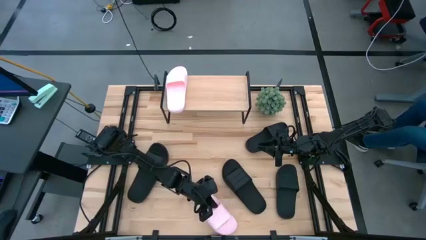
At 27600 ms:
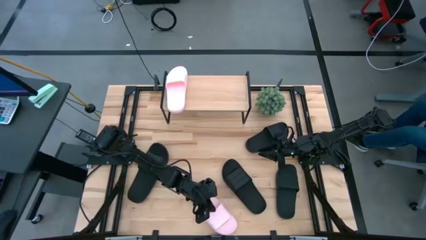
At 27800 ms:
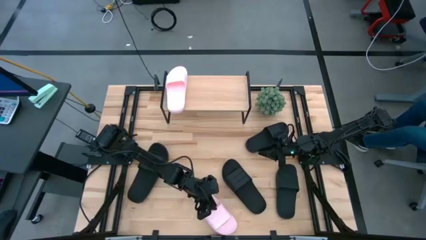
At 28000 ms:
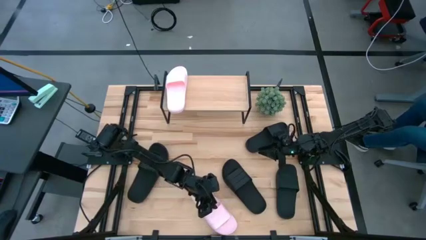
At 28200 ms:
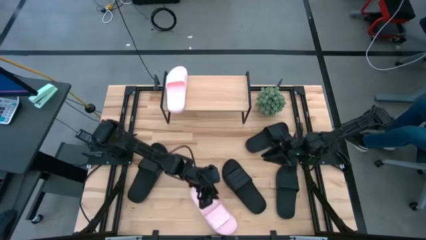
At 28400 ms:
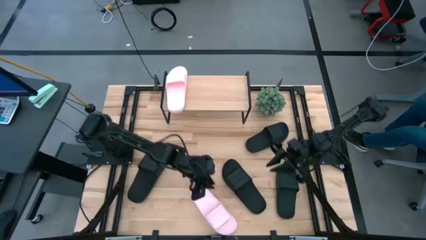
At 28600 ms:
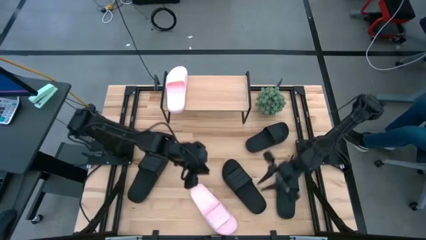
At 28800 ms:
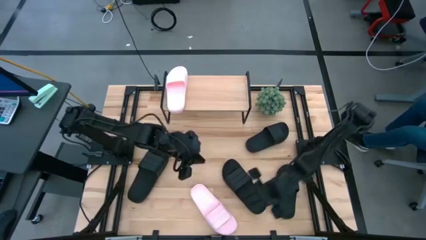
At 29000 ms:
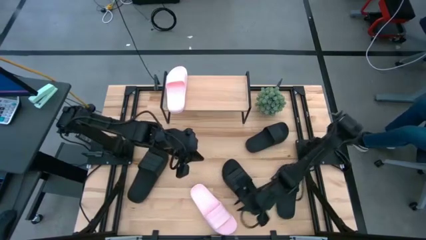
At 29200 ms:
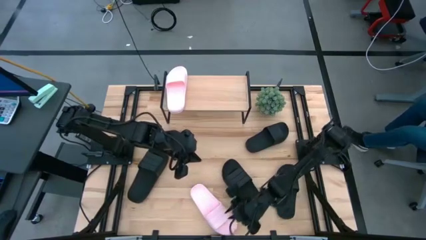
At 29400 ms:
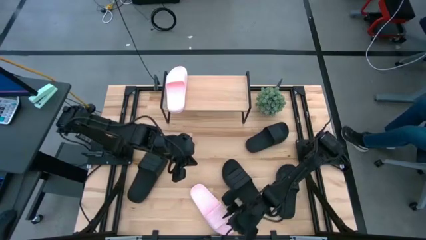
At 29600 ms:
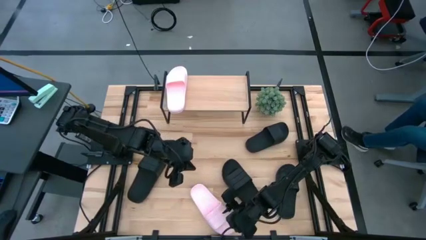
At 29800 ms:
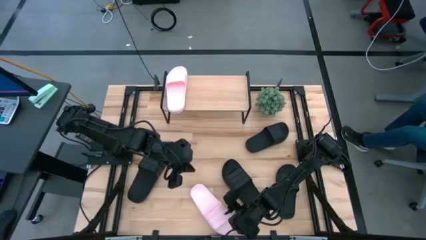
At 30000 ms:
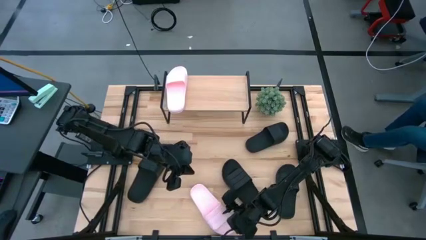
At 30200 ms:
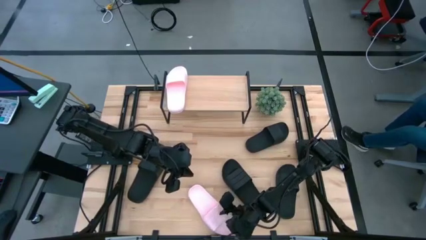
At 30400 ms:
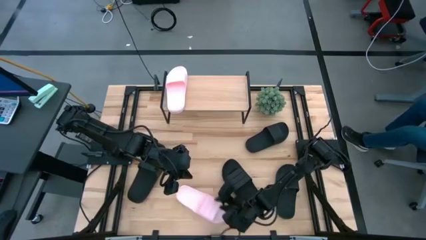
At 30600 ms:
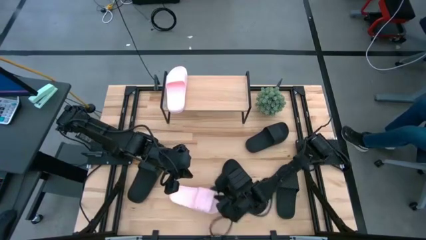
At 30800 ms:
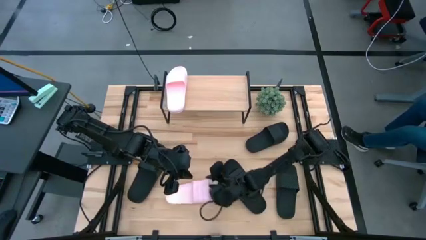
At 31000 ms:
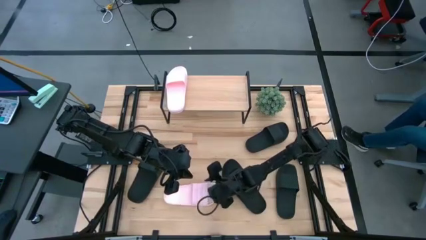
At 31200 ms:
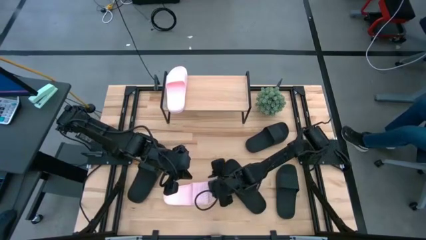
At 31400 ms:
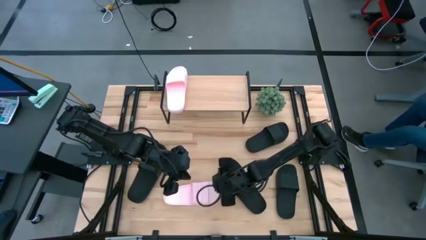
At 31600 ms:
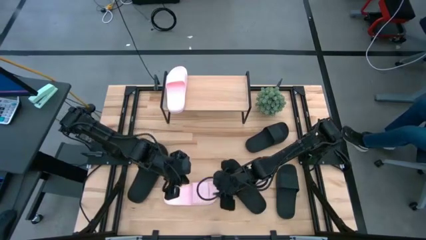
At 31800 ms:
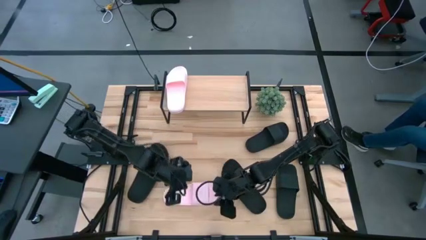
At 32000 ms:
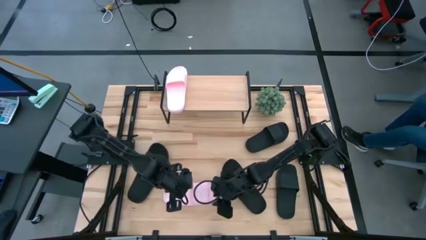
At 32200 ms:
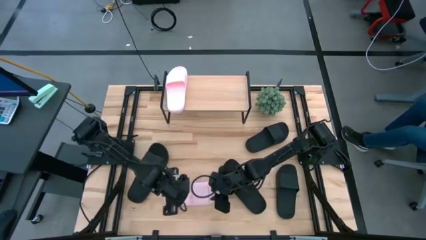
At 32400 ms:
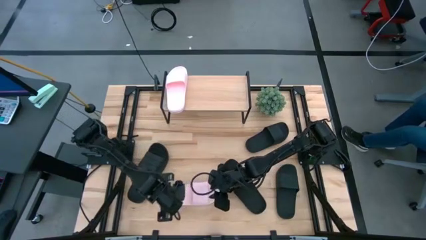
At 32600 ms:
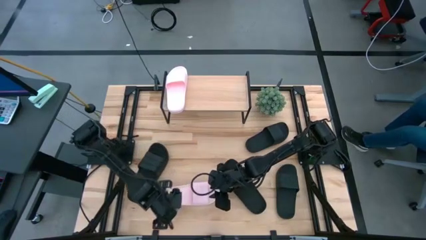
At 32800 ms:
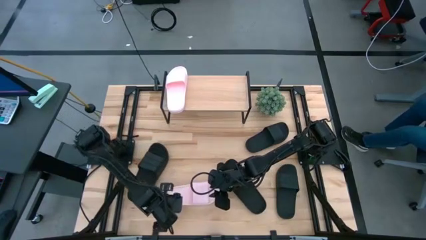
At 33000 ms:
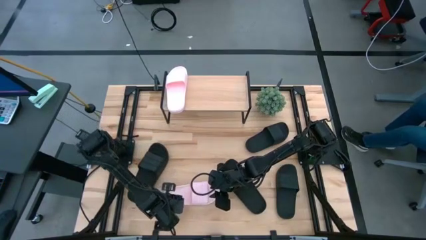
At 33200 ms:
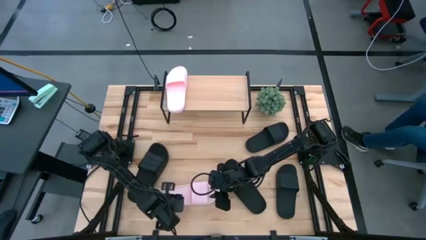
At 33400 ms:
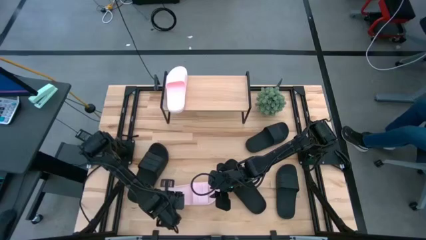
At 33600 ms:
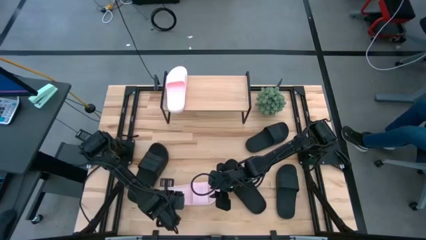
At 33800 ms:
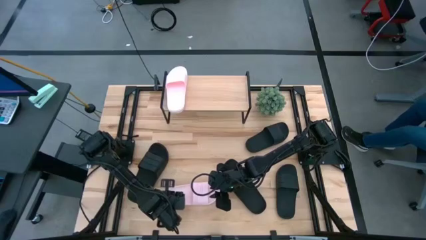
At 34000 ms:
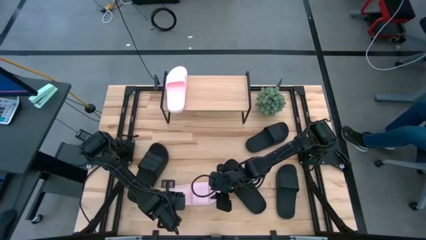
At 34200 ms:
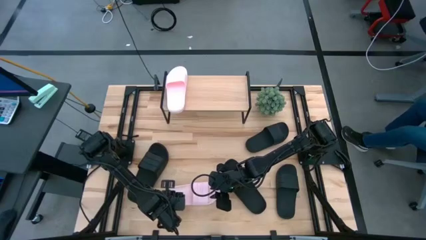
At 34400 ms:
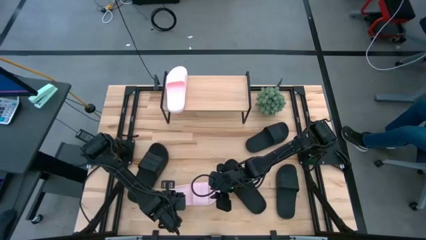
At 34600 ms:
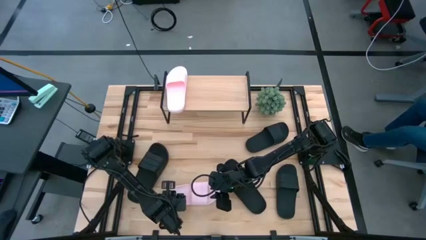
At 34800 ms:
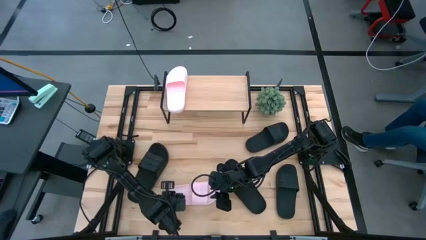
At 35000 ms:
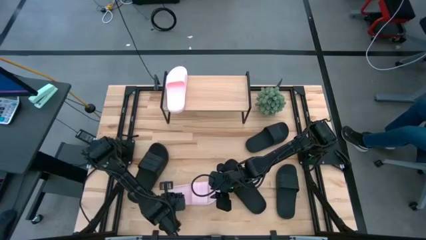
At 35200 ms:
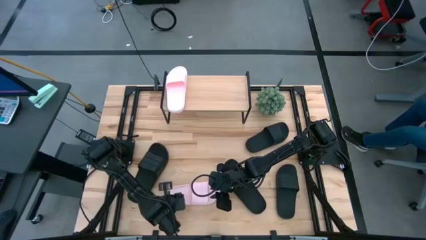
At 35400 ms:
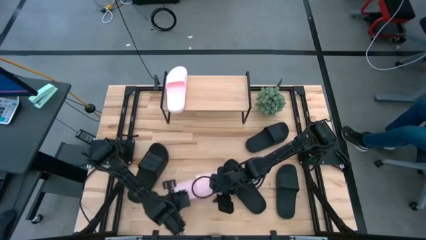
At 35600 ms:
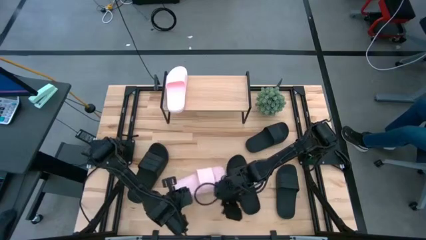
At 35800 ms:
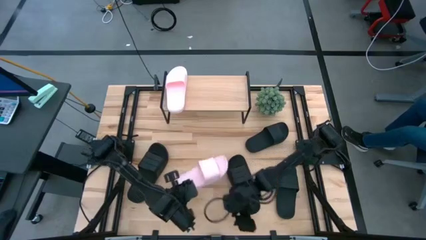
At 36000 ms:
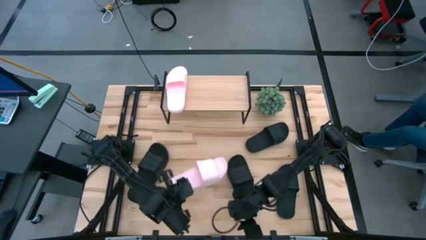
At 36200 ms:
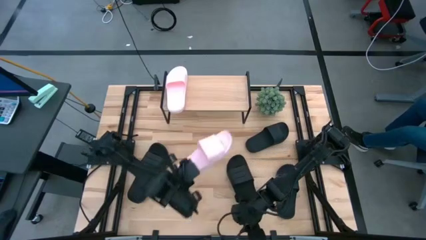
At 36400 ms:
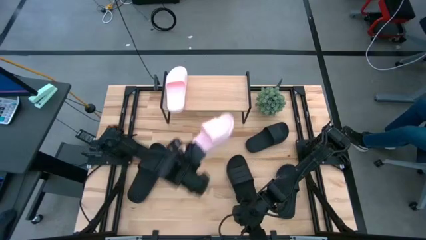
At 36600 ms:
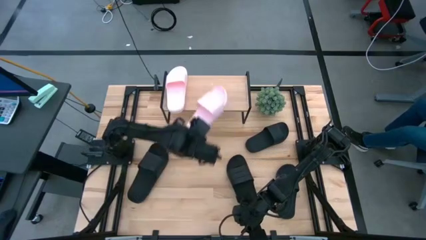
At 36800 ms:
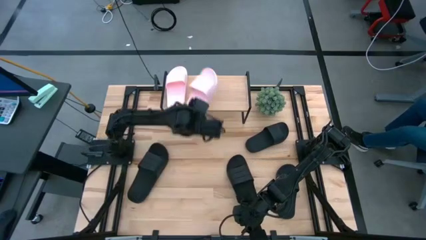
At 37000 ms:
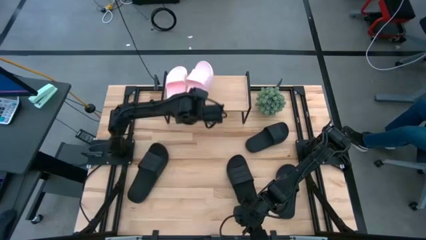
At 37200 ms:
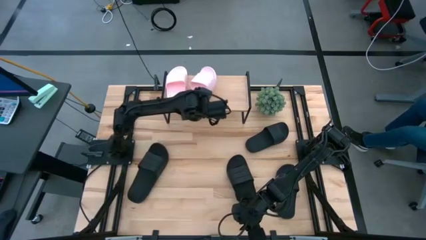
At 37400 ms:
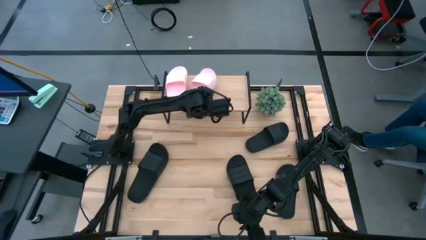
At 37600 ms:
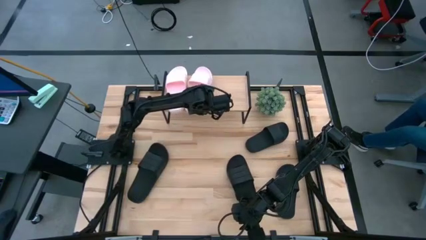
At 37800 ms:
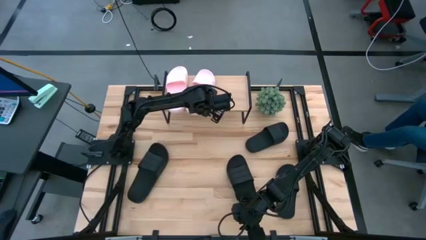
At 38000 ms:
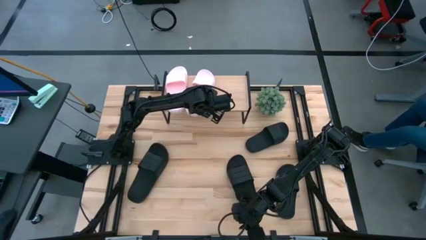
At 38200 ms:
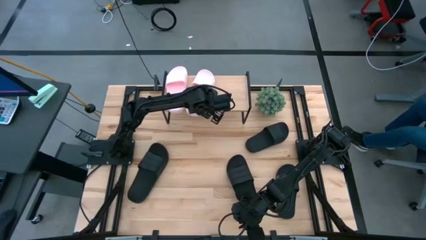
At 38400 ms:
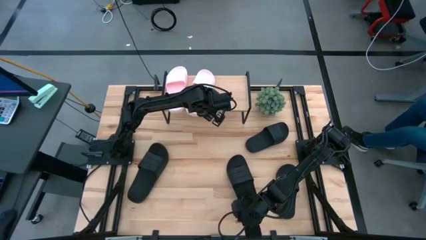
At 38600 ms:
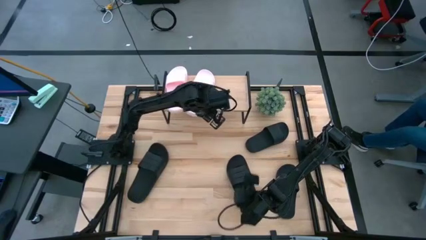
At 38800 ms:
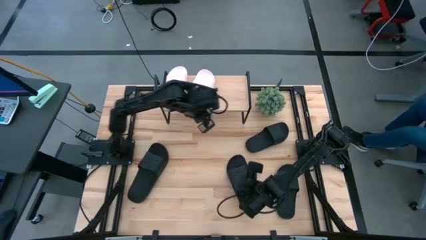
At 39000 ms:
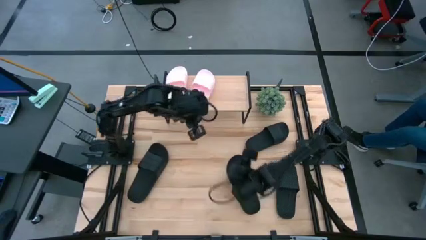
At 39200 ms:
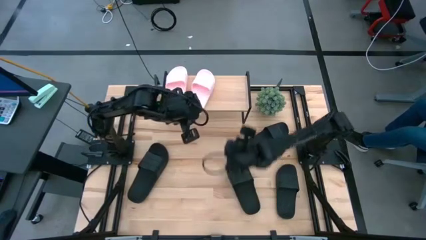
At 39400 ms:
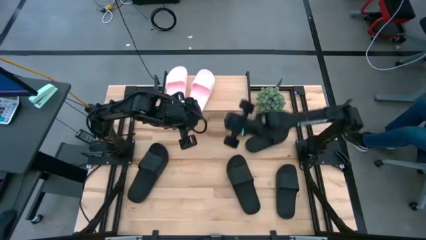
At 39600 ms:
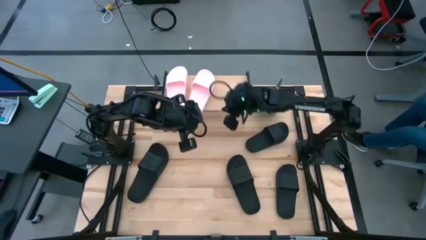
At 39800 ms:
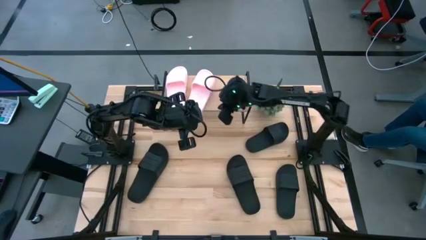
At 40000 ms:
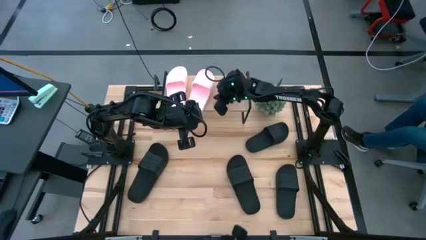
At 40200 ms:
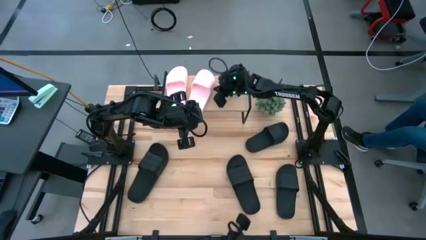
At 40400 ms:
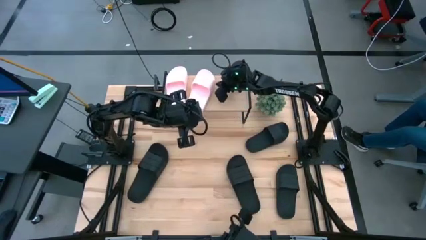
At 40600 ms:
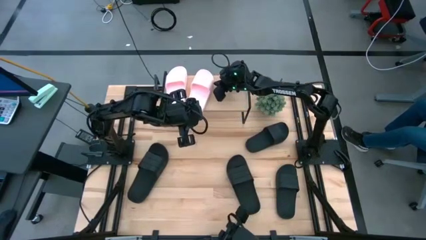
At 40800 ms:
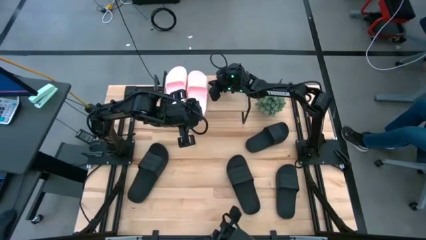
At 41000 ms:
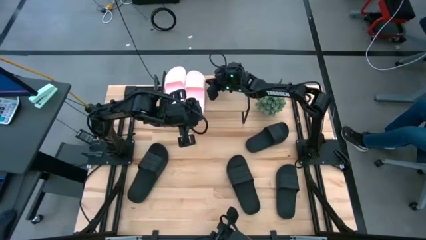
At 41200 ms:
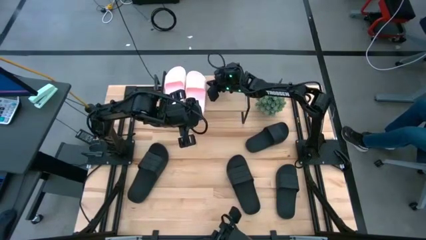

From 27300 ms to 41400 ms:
Task: Pick and place slides into the shelf
Put the pink slipper on the shelf

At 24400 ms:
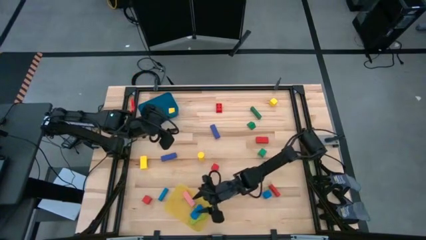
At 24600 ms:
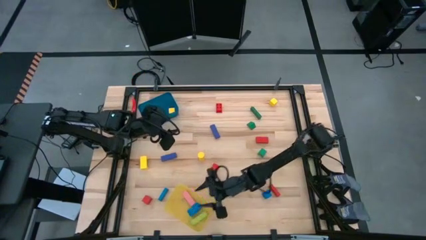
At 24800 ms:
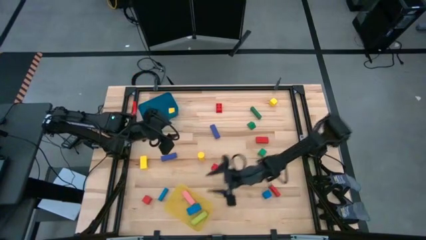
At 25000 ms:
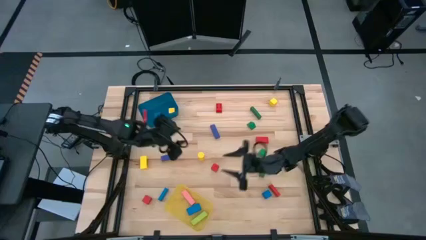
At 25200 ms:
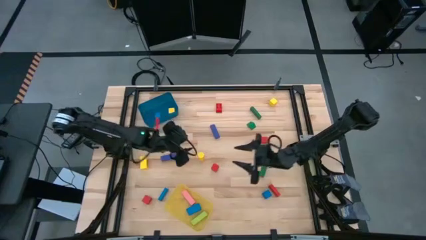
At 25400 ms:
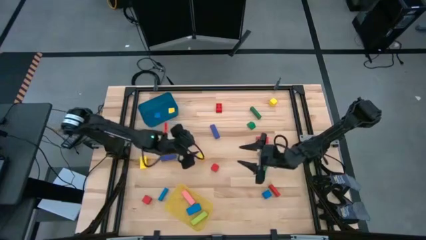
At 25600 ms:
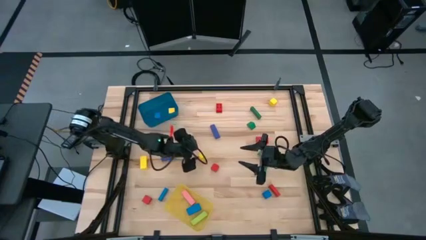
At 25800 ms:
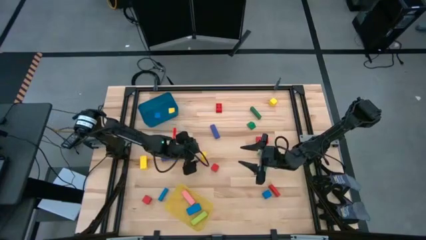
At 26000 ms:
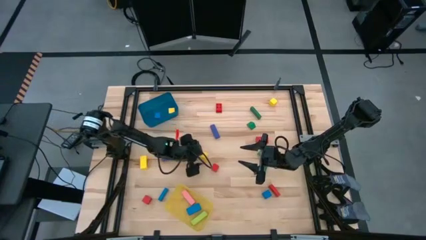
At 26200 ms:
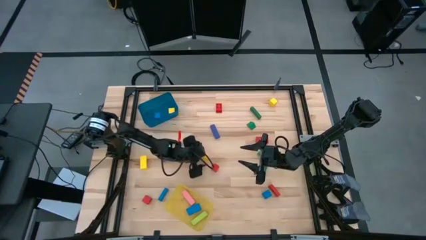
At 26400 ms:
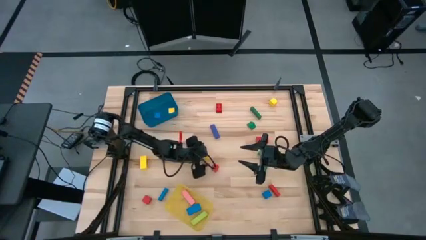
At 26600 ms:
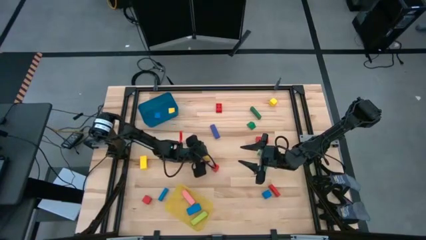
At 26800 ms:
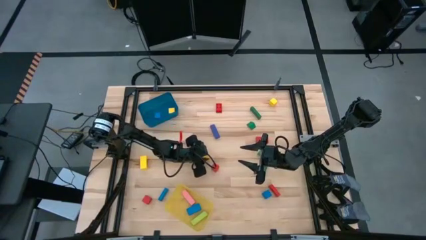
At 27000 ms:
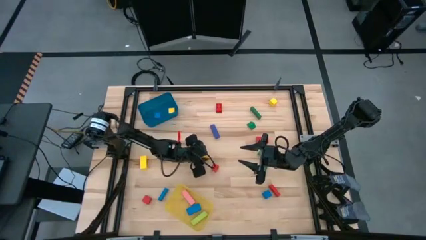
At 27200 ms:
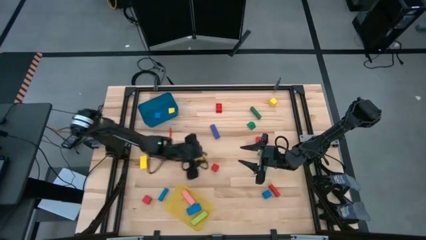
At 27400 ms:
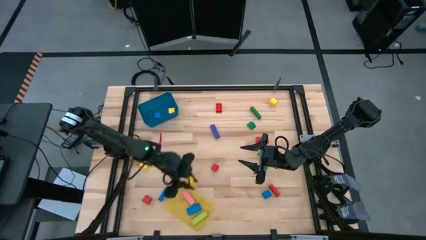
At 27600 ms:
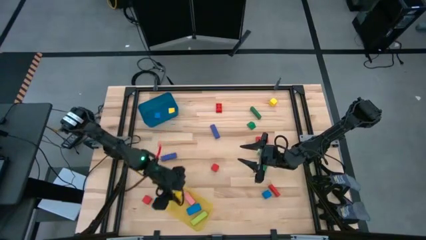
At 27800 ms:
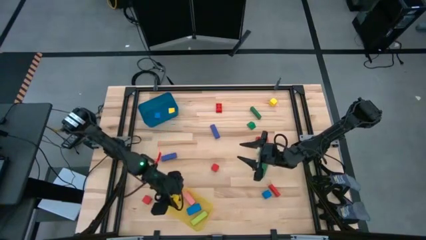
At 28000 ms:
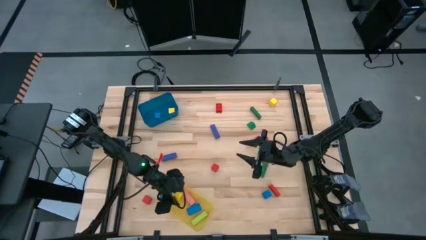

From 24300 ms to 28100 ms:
Task: Sort blocks by size
Put the right large yellow block into the yellow bin
